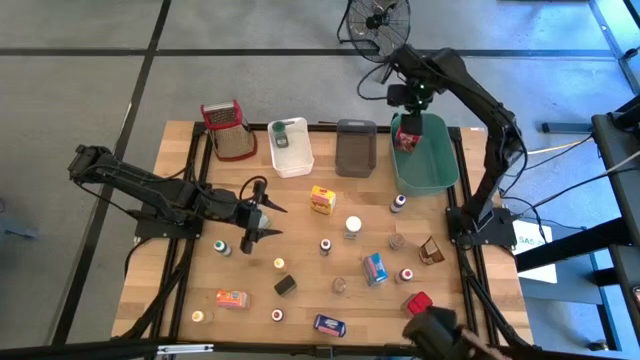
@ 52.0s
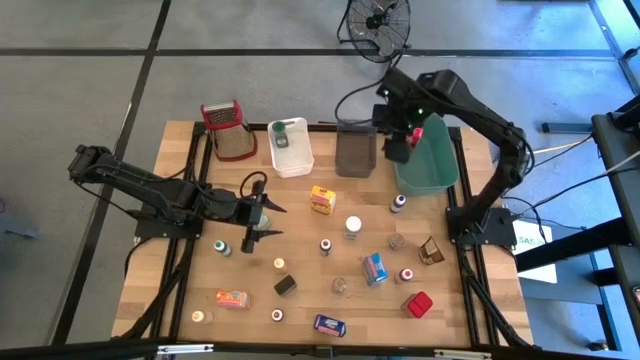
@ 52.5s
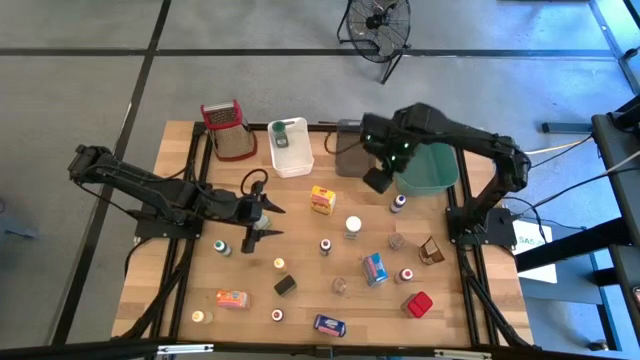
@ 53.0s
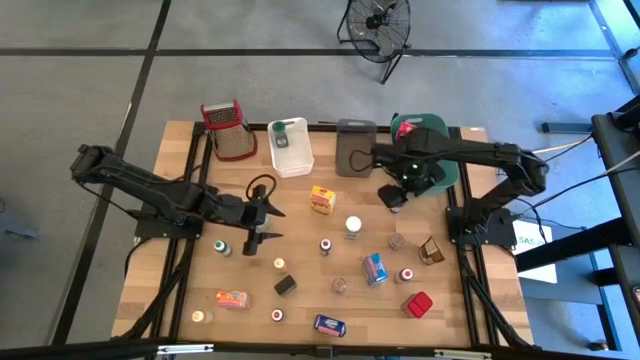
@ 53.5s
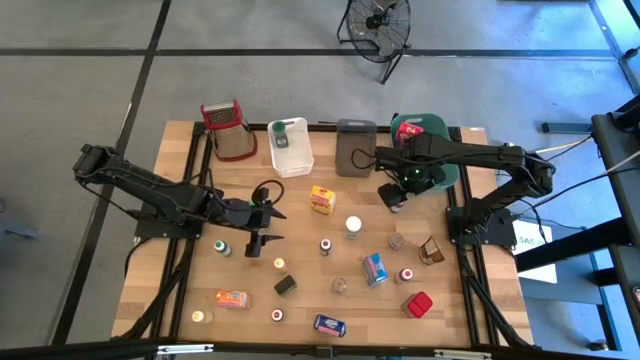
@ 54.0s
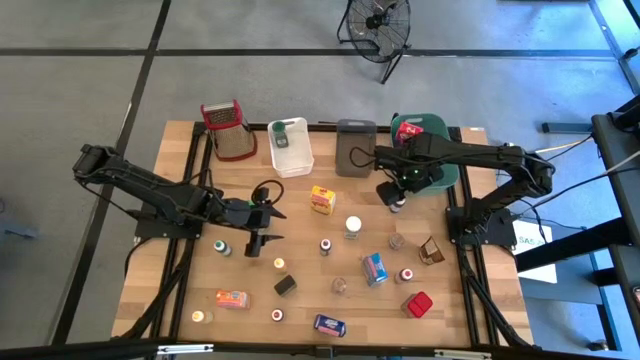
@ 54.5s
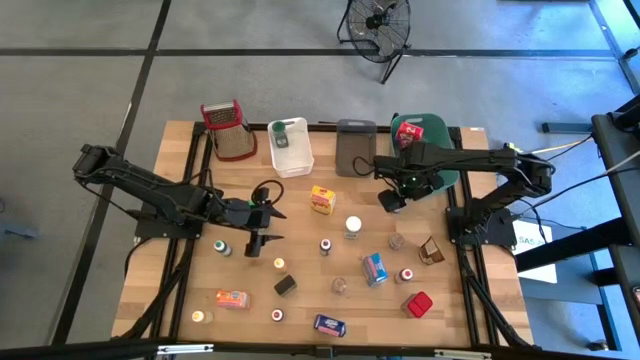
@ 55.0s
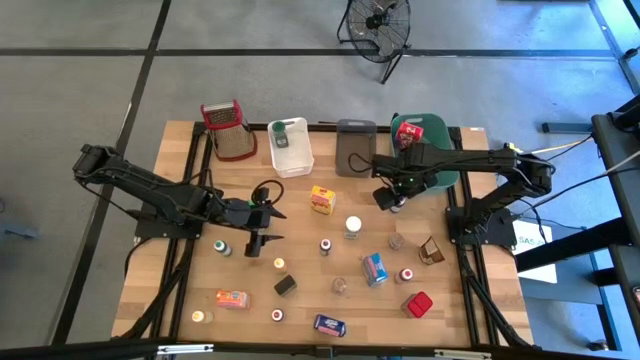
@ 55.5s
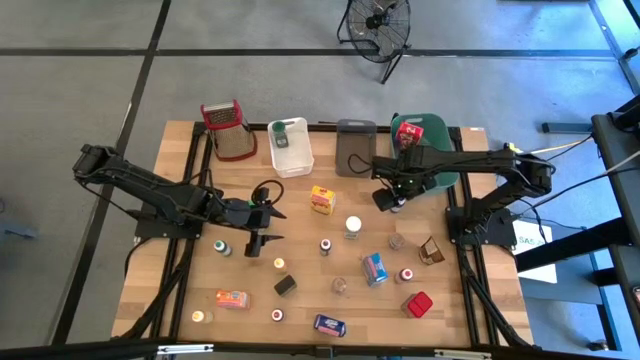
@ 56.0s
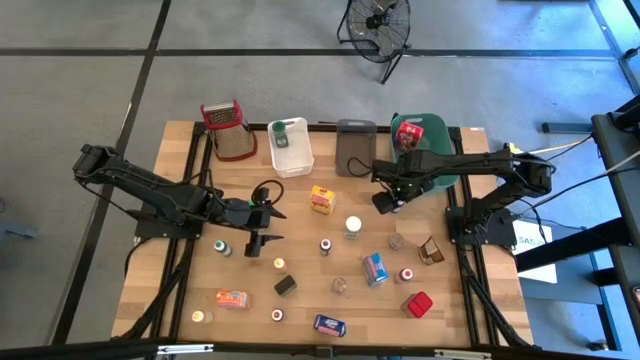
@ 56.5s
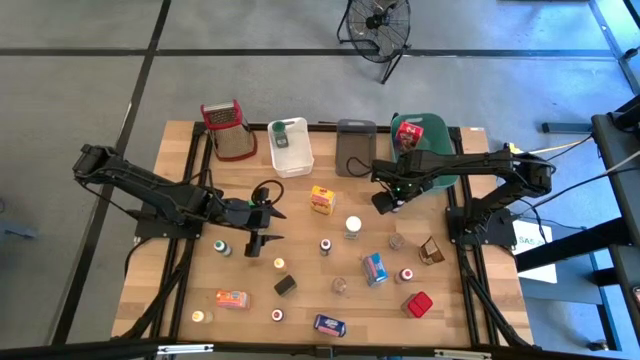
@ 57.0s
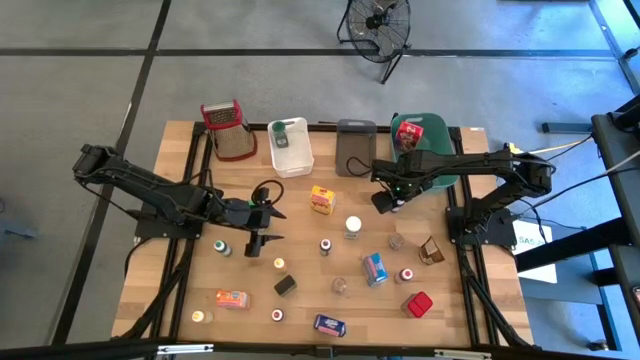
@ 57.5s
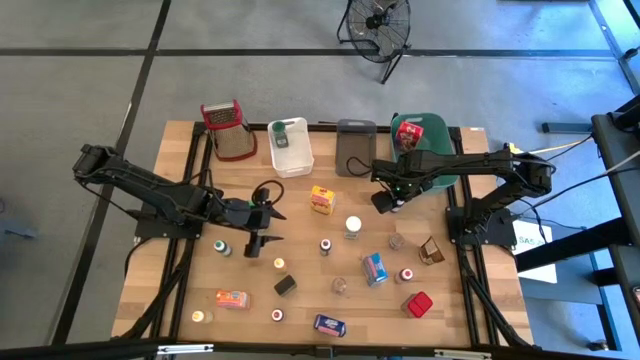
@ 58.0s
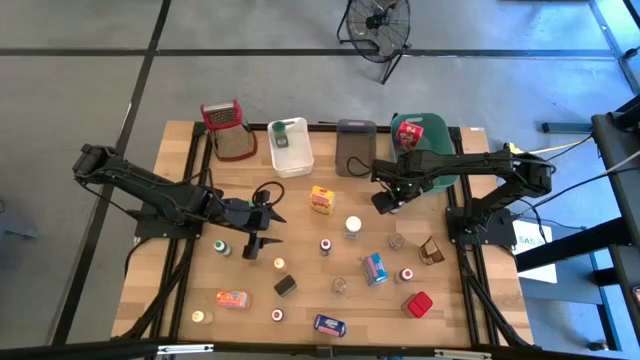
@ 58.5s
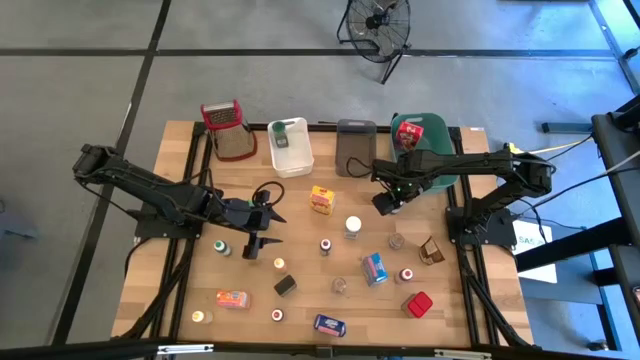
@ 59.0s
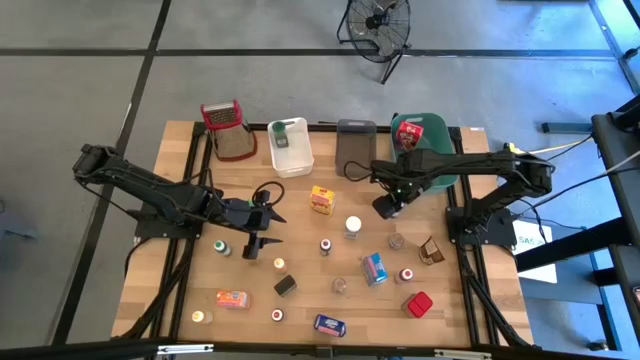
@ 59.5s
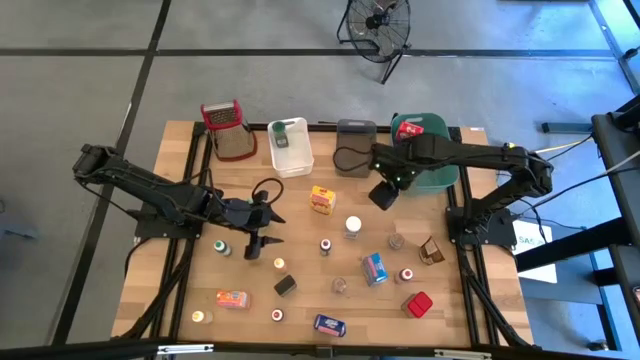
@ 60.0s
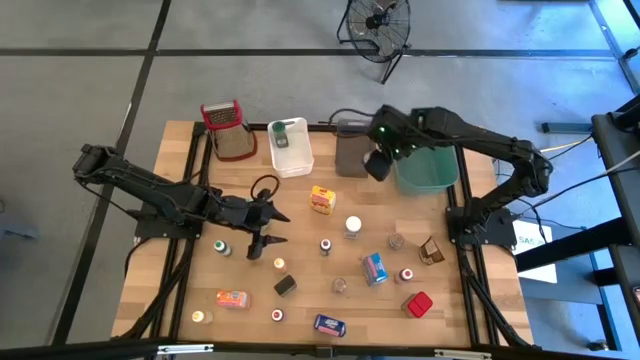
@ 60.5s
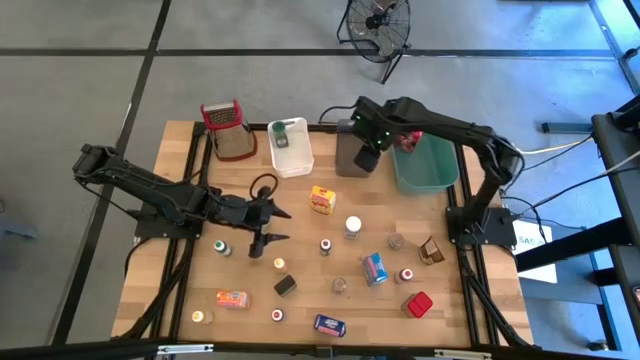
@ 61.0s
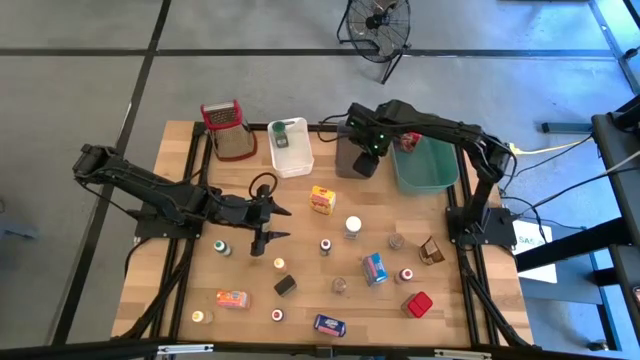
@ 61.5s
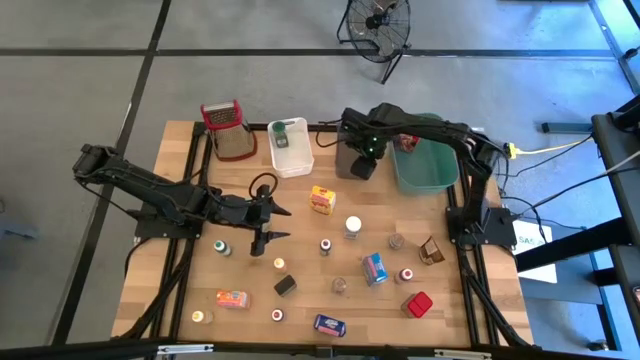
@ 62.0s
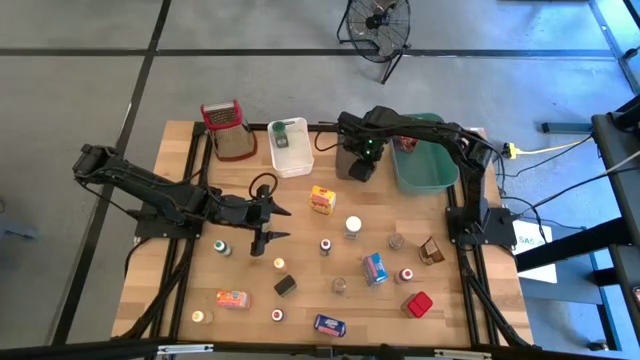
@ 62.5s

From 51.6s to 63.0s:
Task: Pick & Place Kitchen Items
Put the blue food coloring bottle into the black transparent bin
